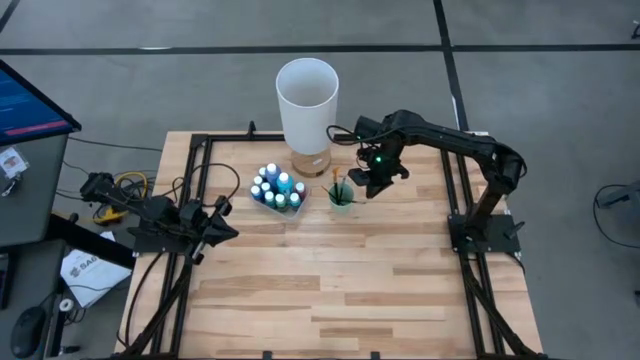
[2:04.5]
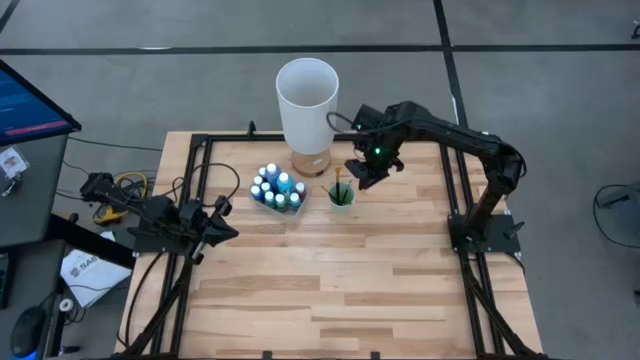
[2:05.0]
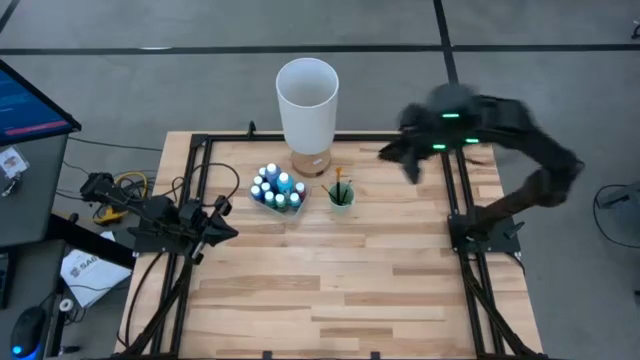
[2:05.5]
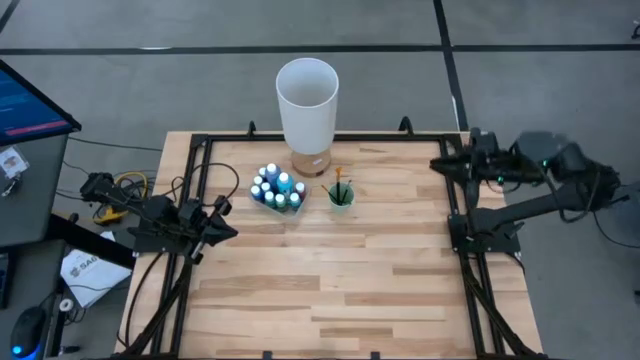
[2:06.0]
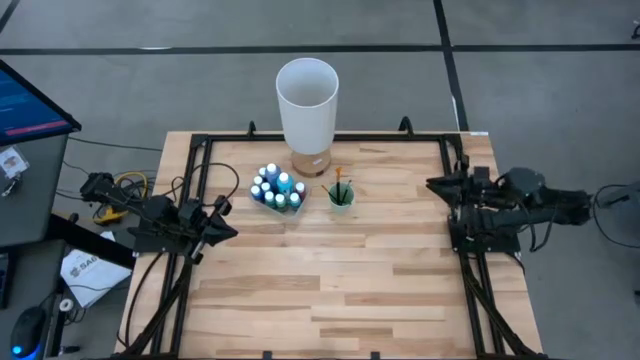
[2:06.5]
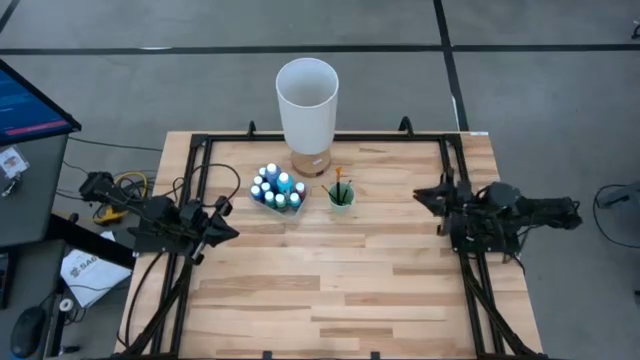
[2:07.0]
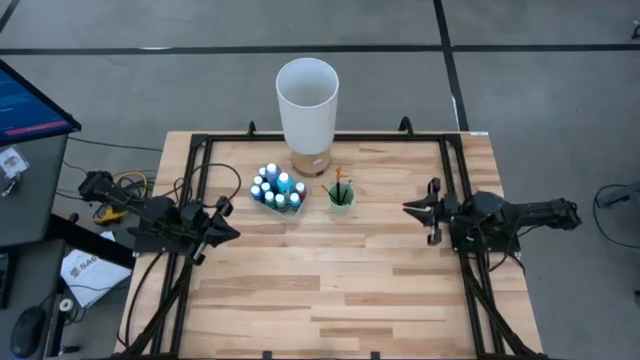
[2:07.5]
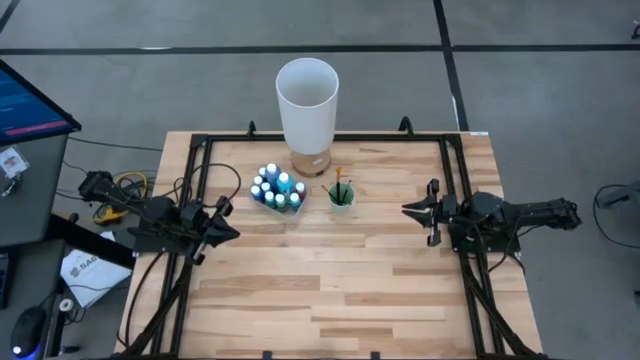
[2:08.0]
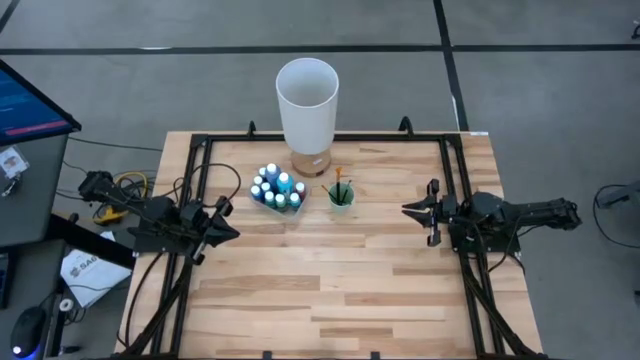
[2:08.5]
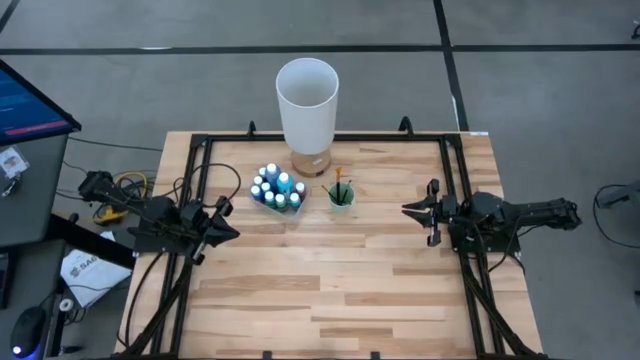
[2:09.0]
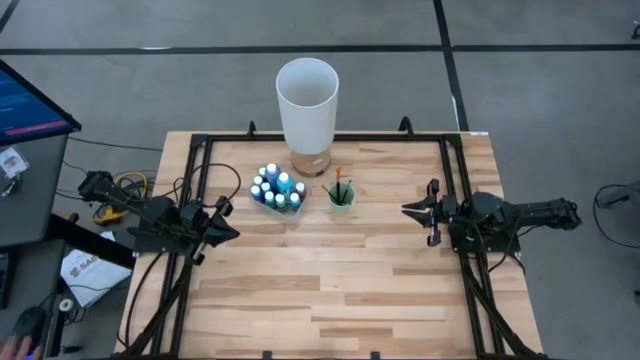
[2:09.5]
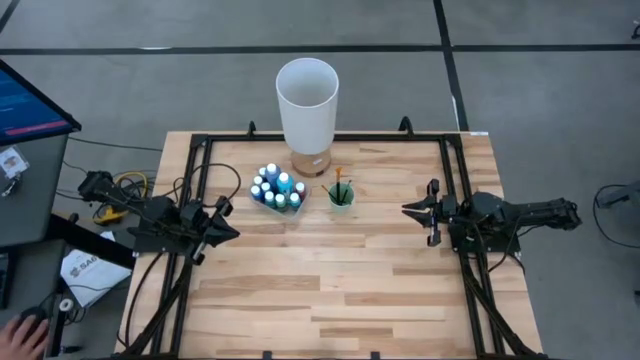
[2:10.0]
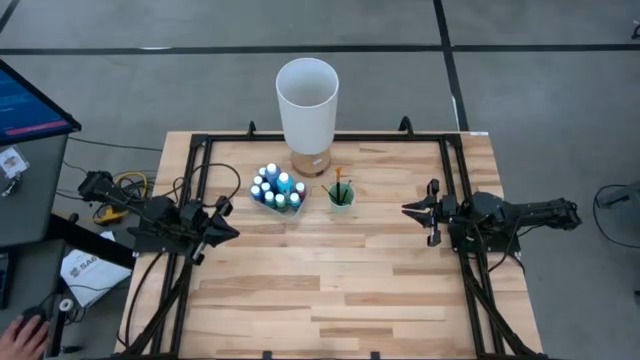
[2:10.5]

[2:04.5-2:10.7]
Task: Pick & Place Paint Supplies
Return to Home Position

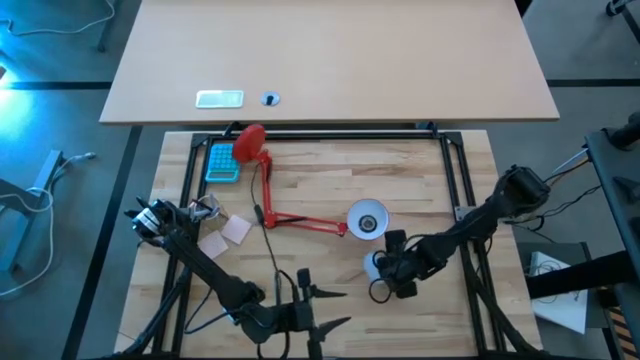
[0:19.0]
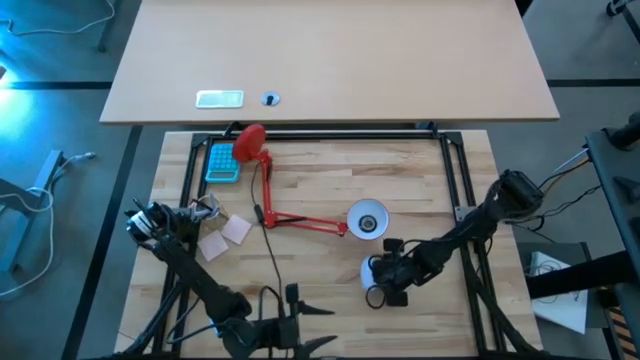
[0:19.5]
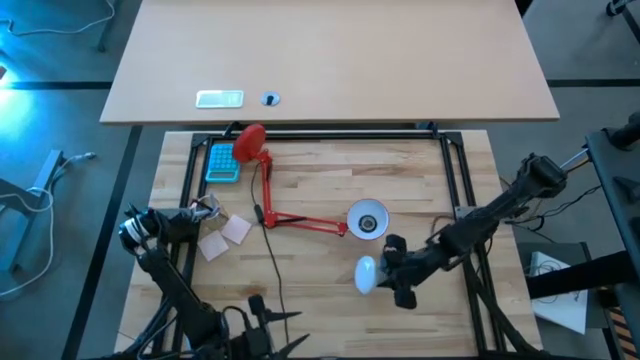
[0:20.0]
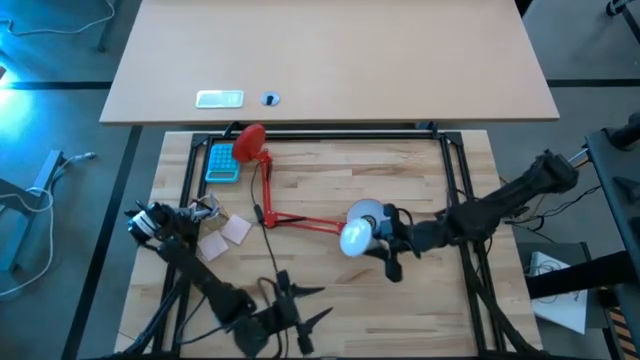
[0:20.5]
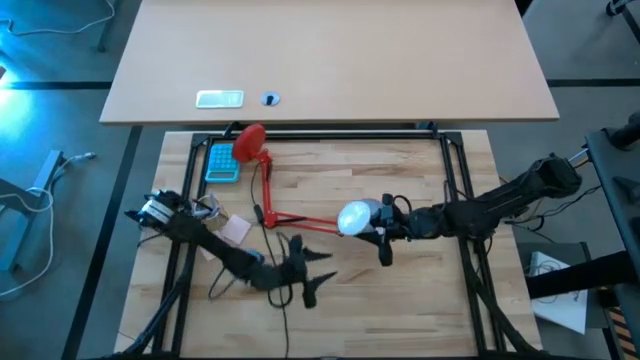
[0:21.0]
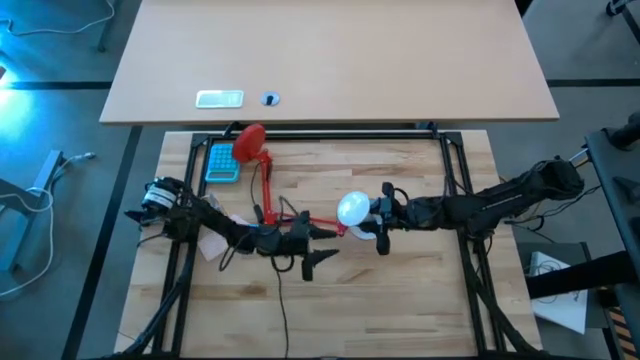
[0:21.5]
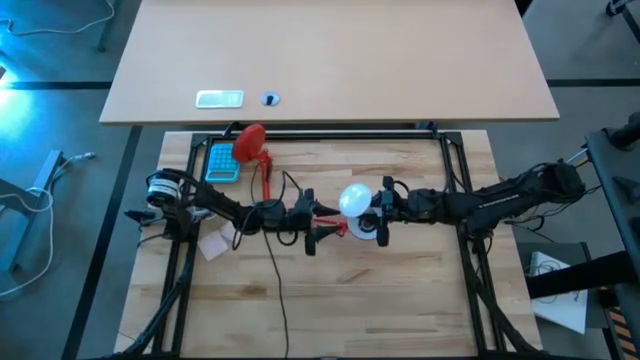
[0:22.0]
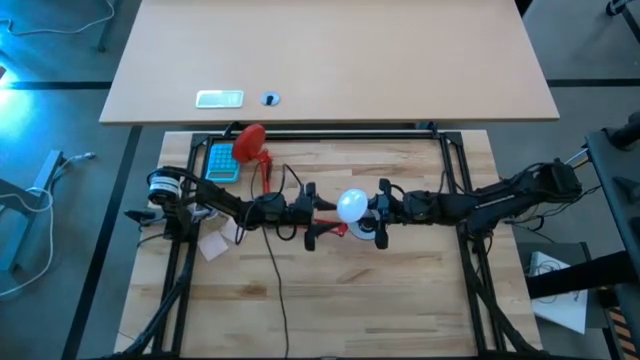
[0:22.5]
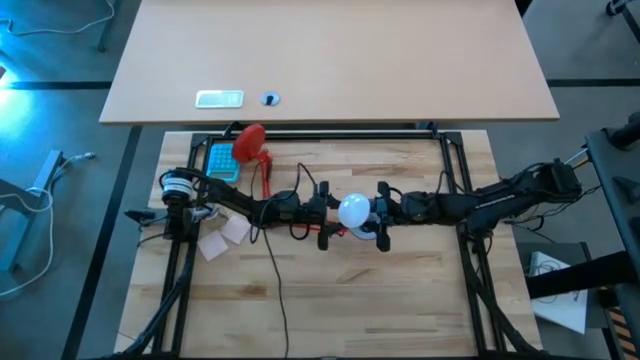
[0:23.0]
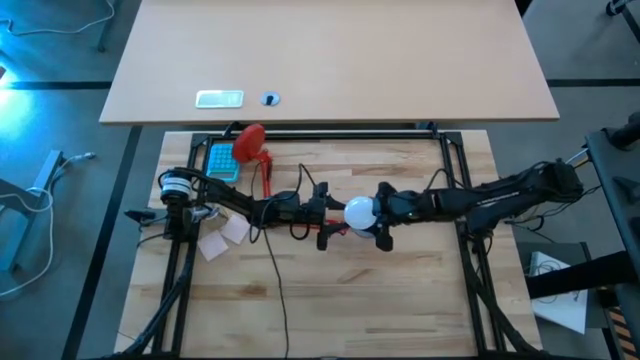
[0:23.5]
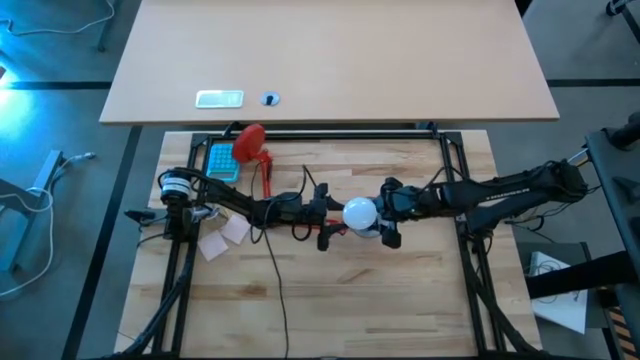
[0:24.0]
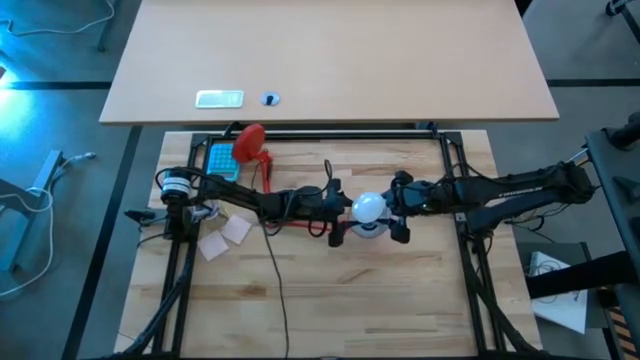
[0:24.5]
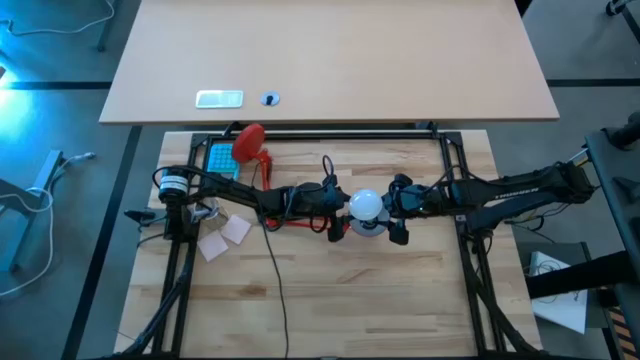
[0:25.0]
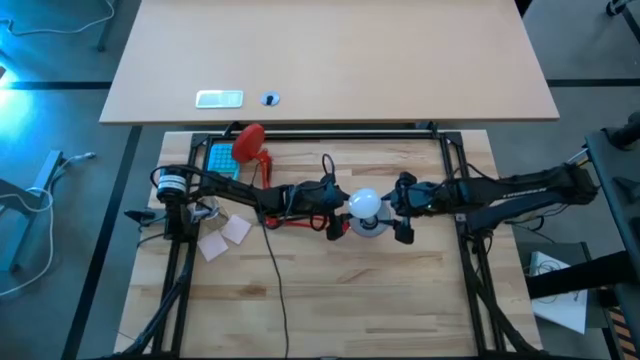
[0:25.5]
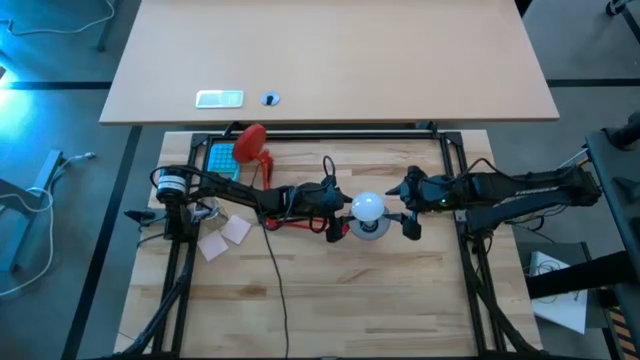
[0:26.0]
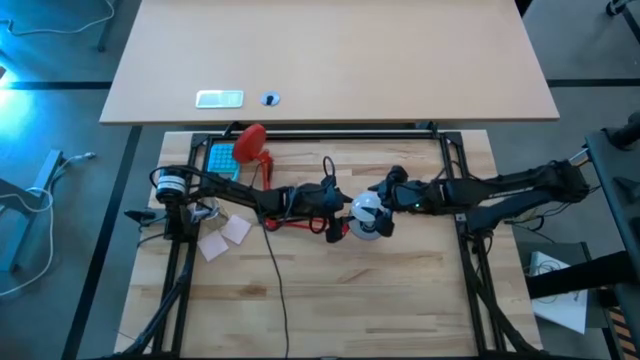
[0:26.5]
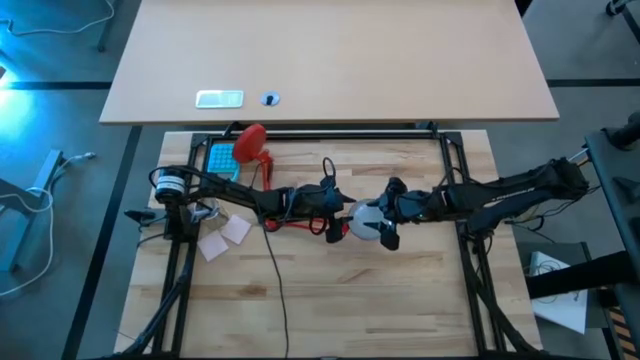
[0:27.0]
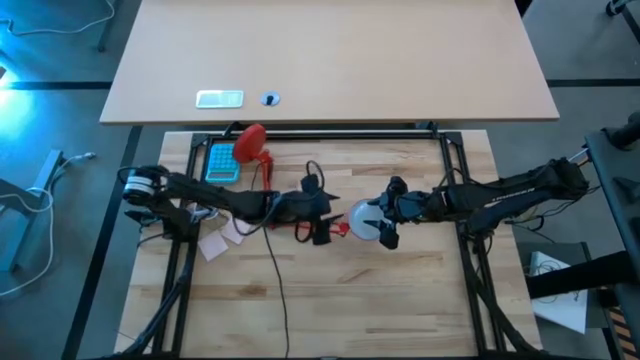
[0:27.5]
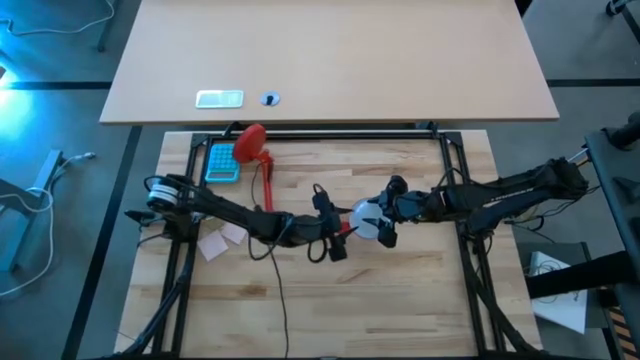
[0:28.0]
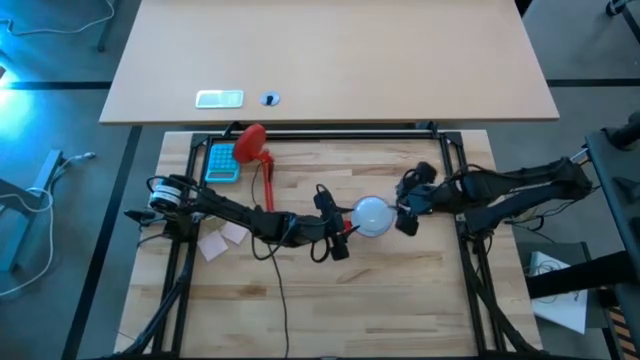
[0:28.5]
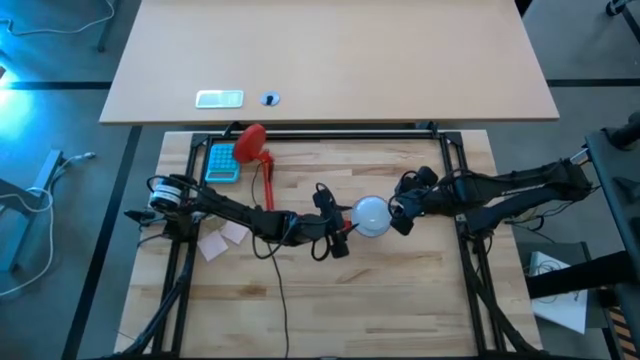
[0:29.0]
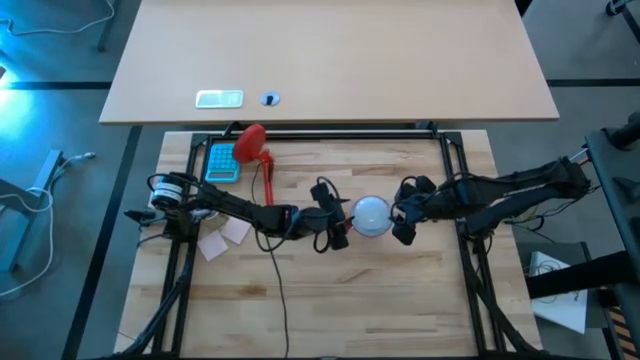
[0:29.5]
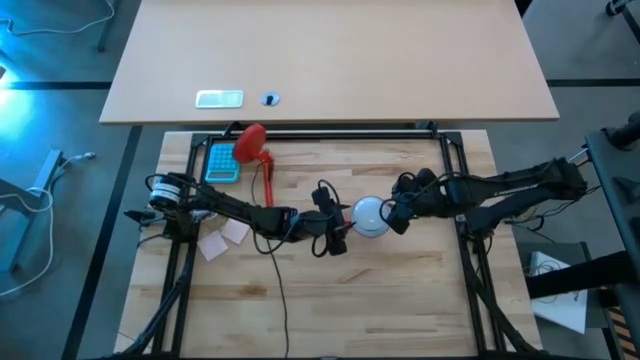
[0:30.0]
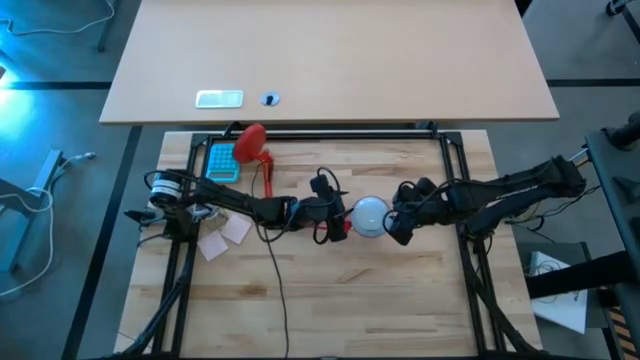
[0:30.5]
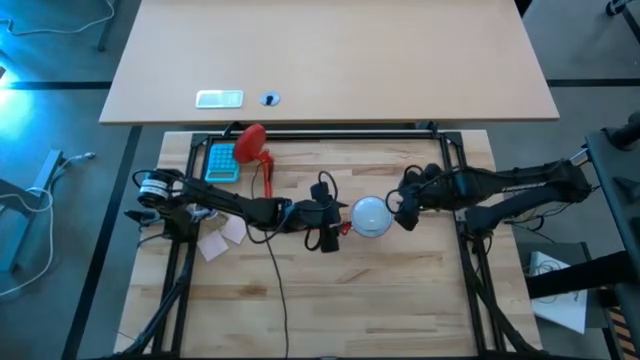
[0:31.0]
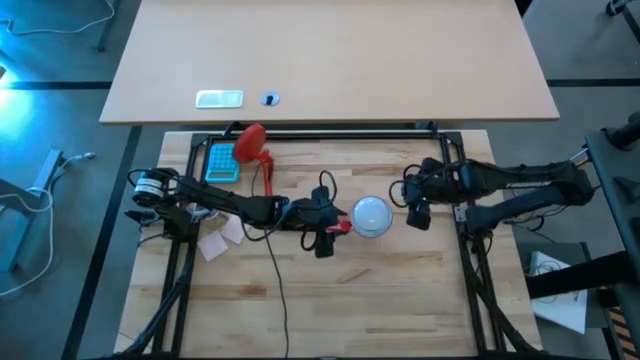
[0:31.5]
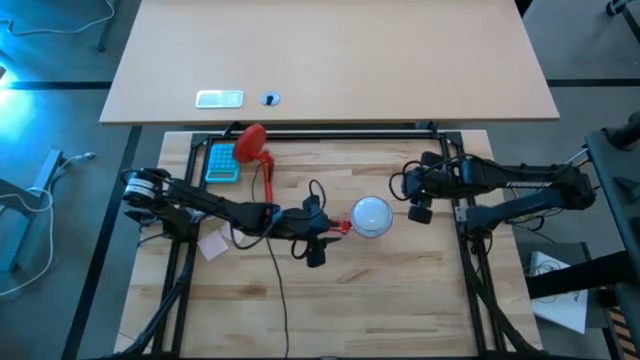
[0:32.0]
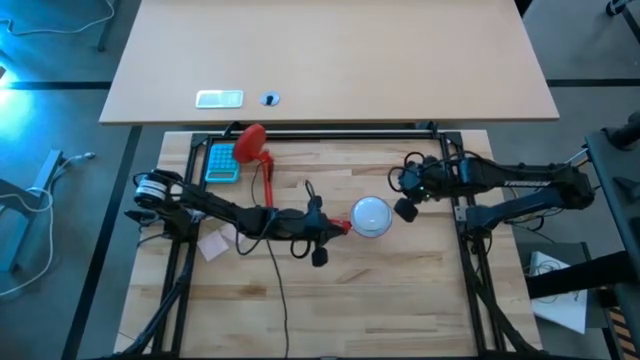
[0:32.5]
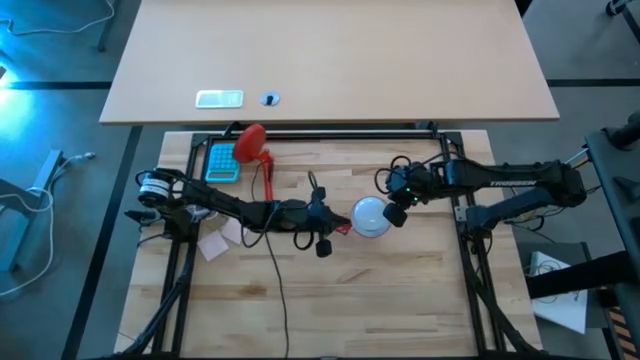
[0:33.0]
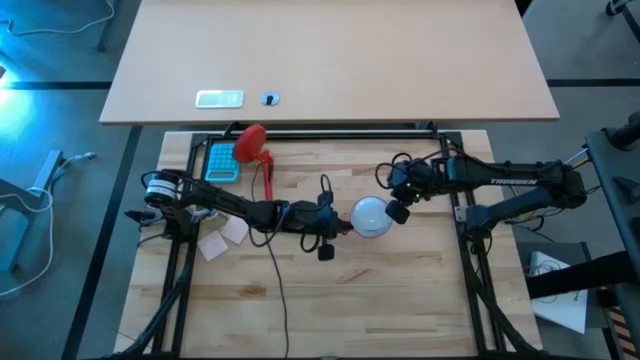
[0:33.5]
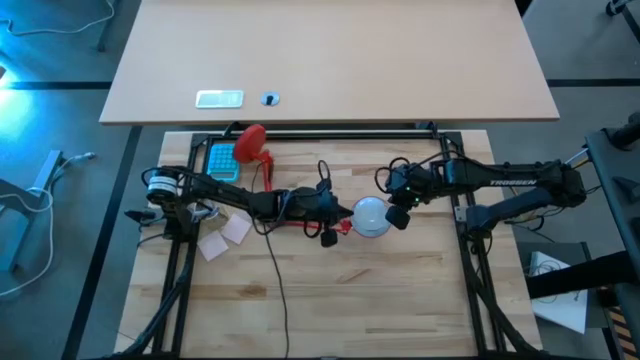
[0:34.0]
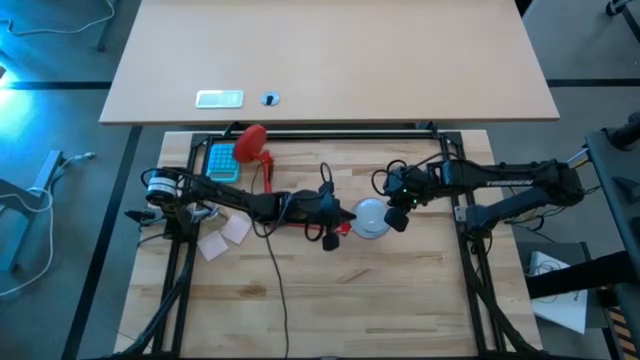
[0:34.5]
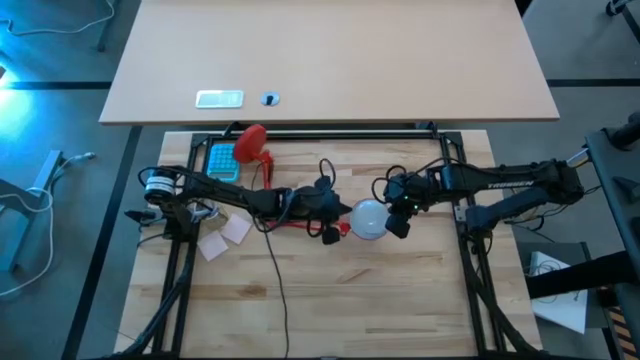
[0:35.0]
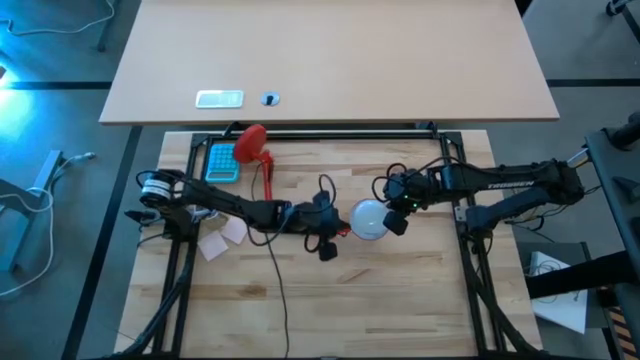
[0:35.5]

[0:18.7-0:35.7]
Task: Screw lightbulb
Insert the light bulb into the lamp
